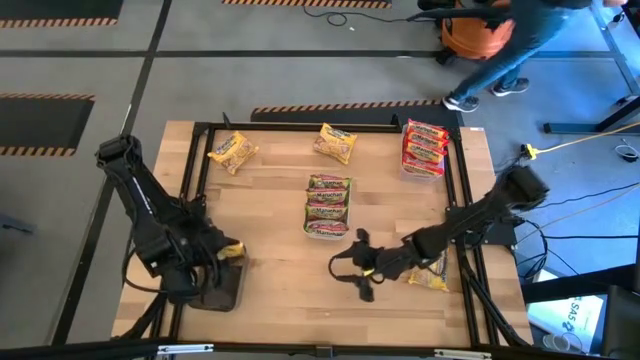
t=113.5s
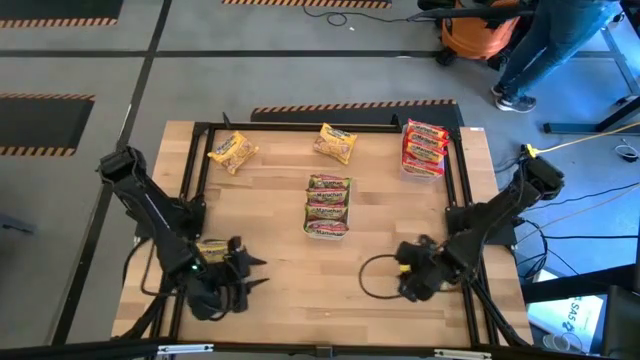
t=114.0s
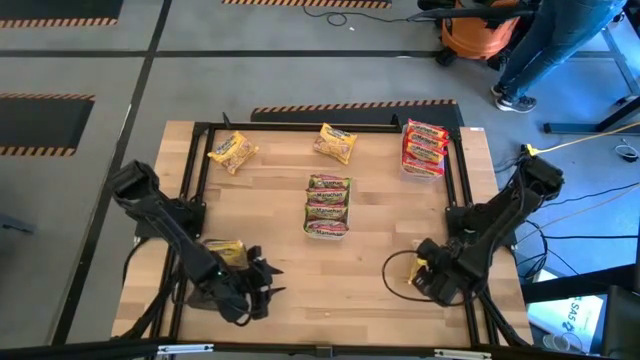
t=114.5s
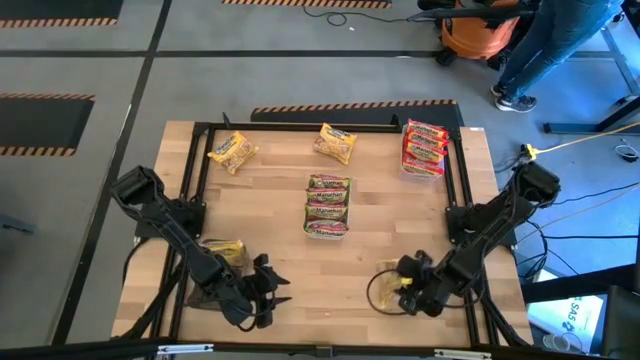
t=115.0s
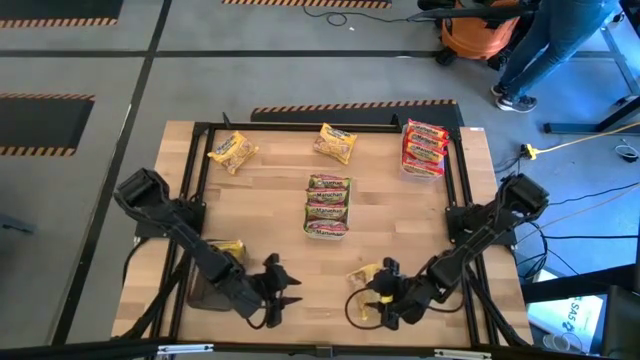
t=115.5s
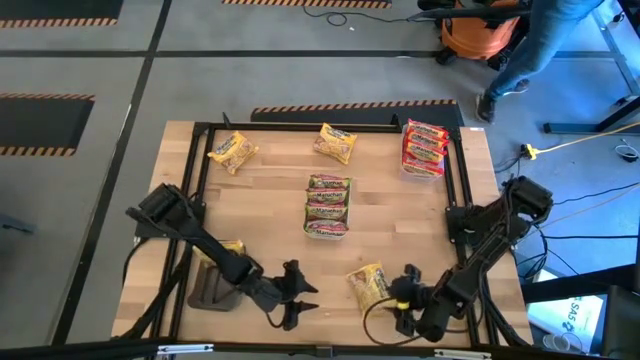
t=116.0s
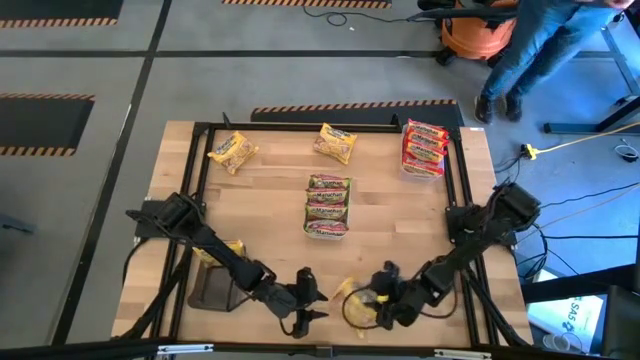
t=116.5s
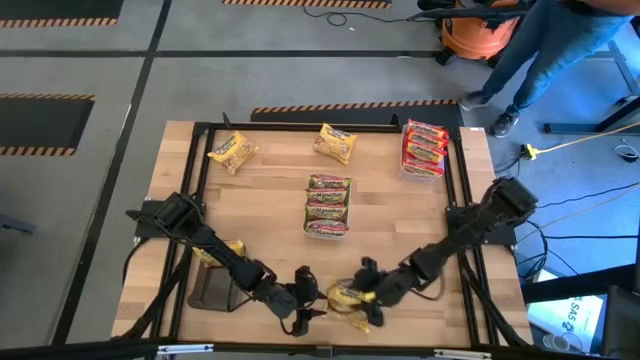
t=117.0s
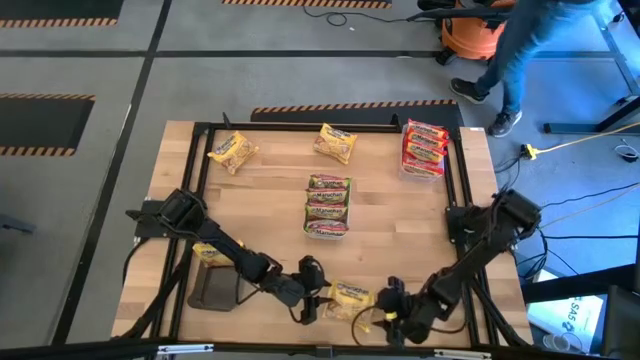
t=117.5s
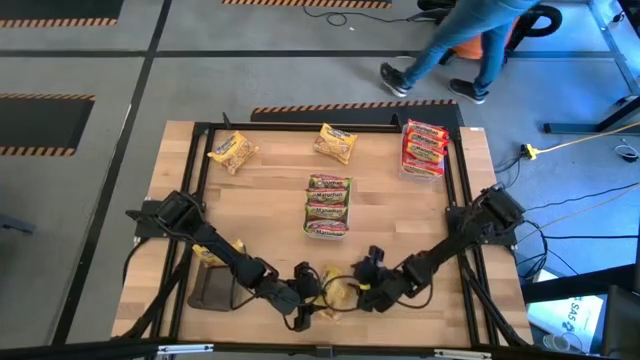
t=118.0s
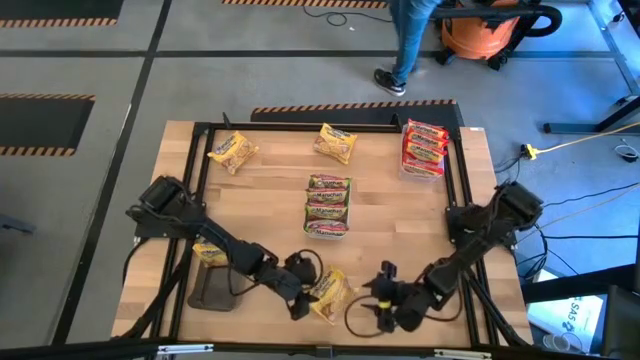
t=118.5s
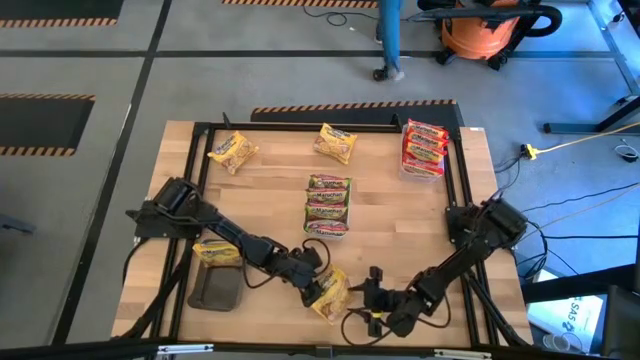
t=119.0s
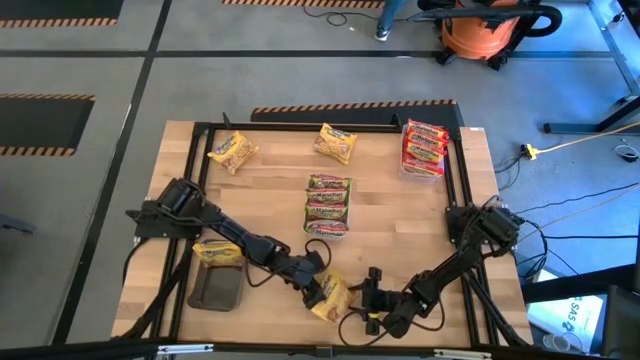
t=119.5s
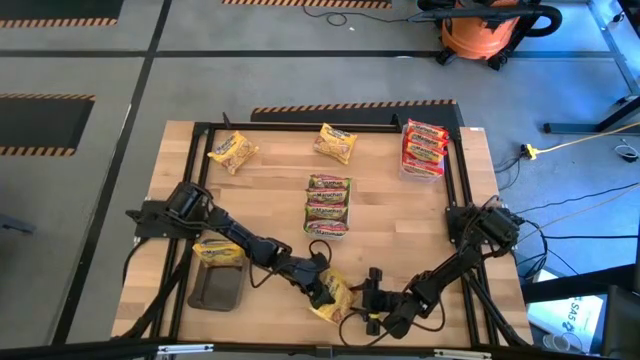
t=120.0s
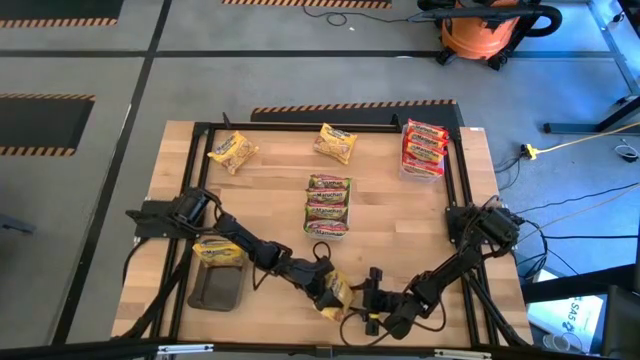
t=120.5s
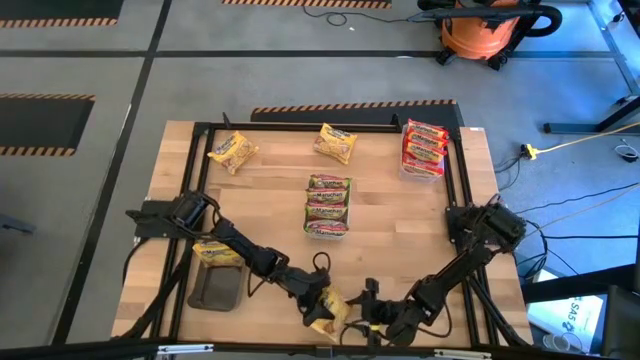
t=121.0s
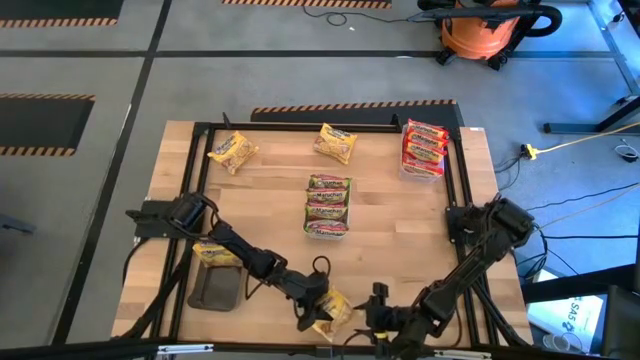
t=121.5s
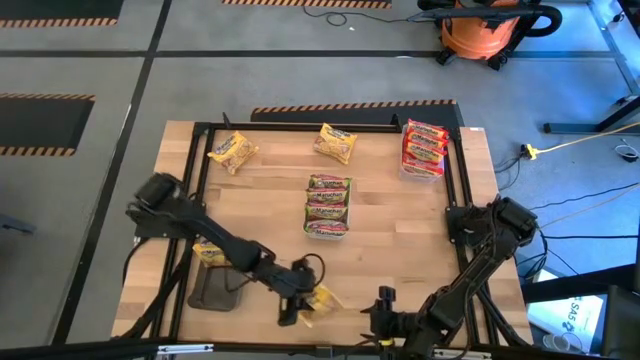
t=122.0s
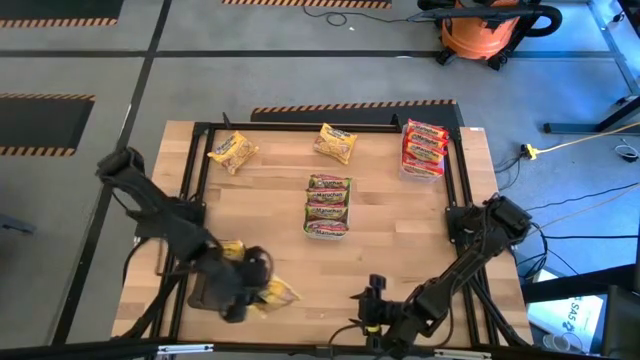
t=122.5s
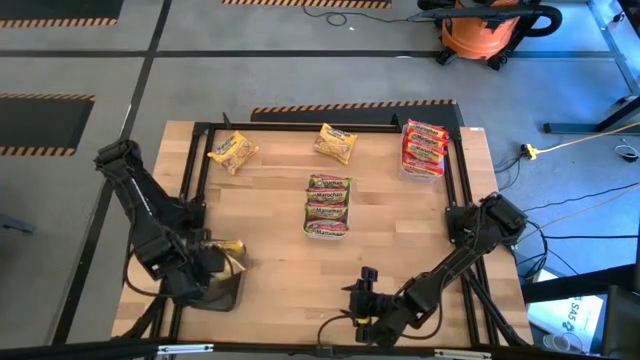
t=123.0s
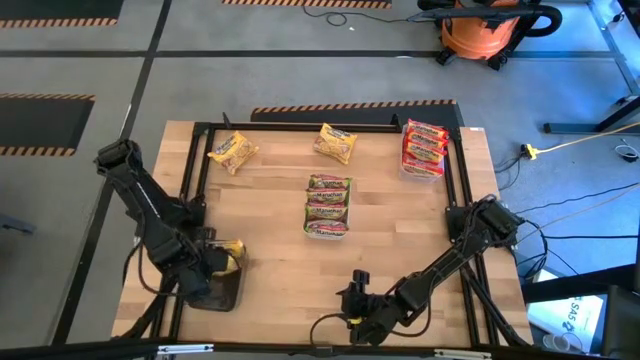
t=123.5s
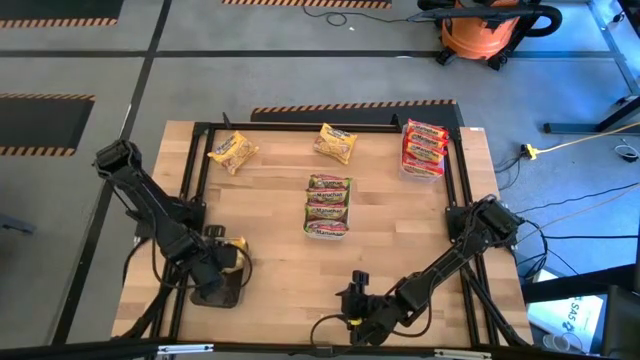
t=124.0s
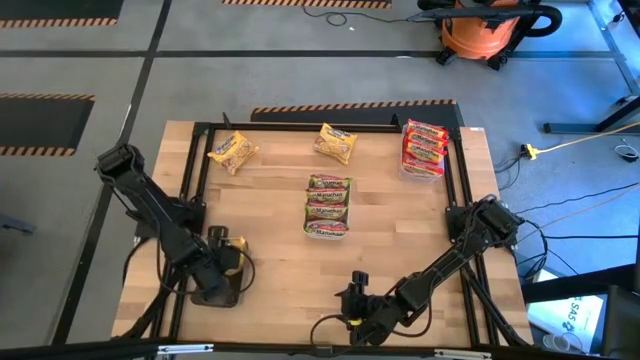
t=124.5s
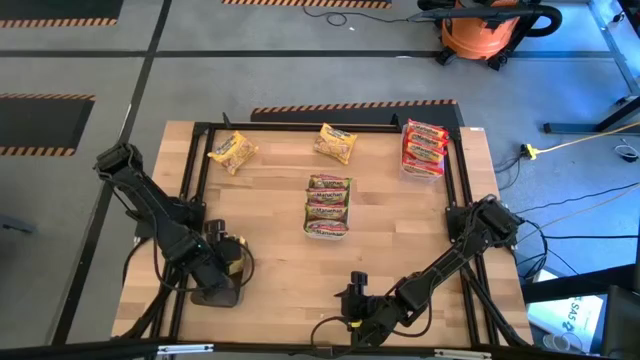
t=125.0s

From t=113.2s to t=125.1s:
Task: Sort Maruchan noodles
Put the yellow noodle pack into the black bin

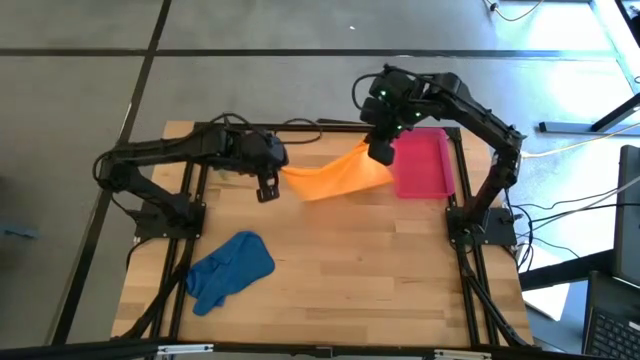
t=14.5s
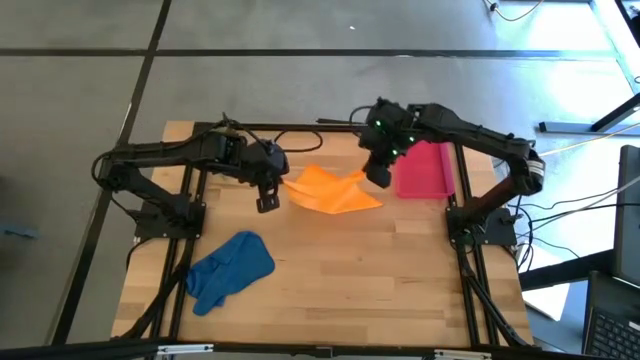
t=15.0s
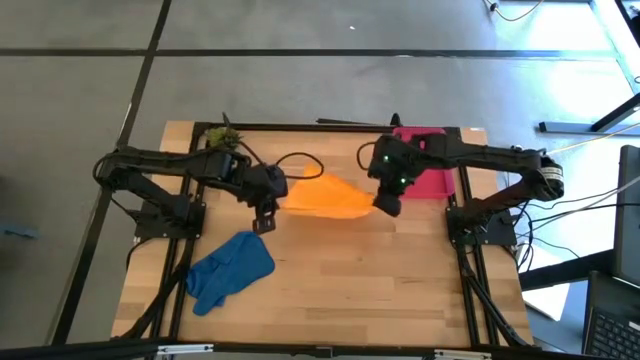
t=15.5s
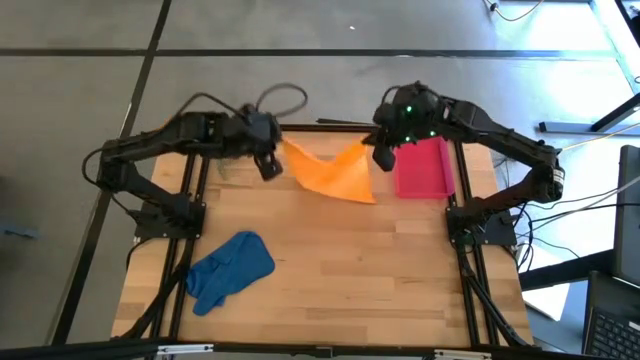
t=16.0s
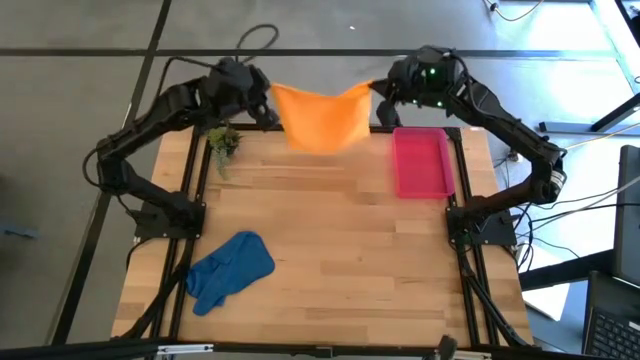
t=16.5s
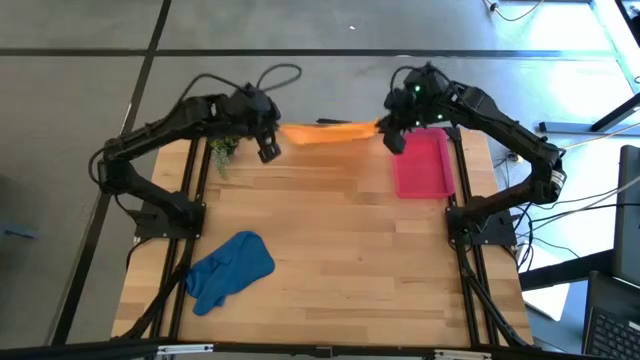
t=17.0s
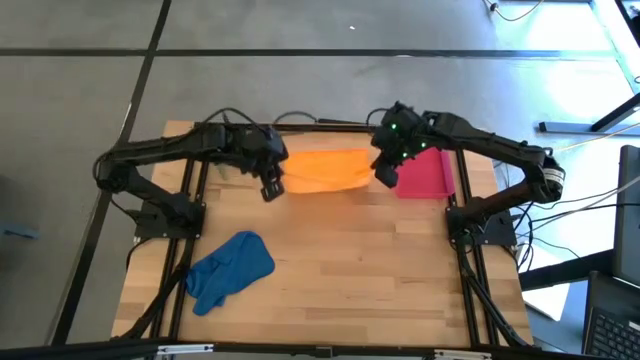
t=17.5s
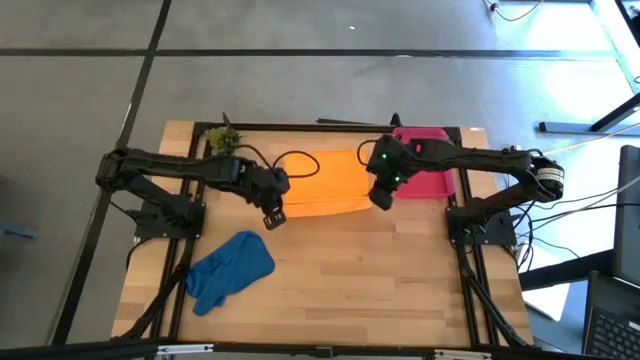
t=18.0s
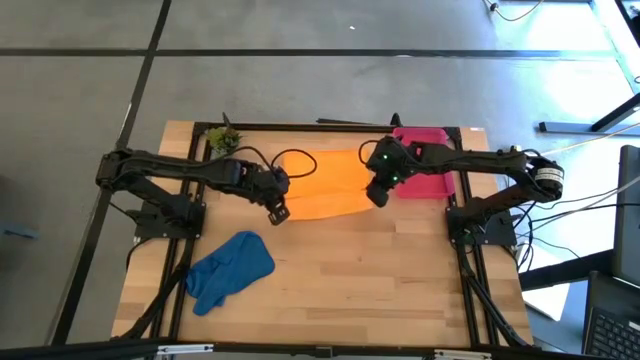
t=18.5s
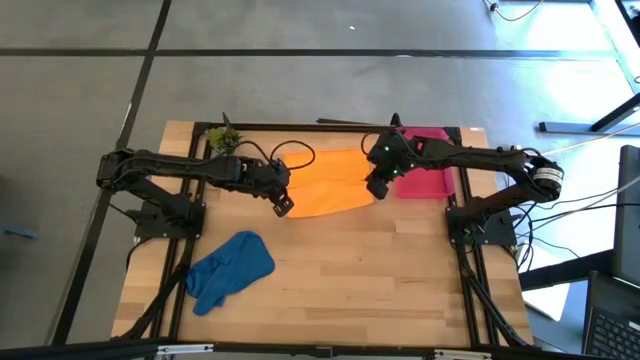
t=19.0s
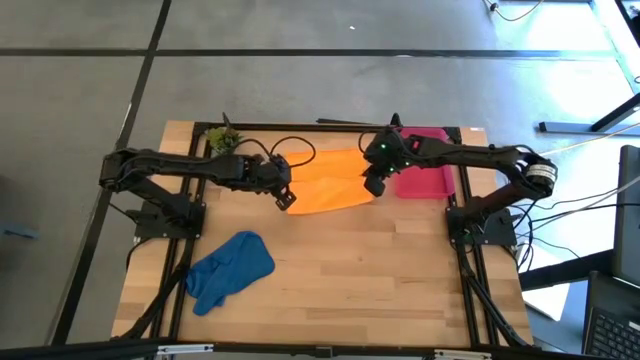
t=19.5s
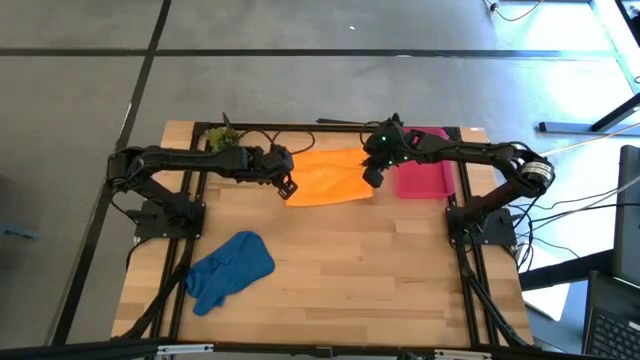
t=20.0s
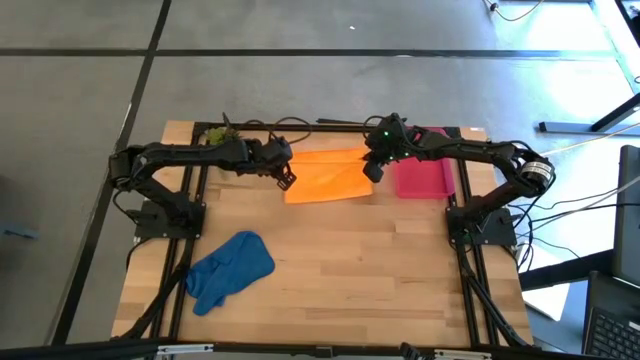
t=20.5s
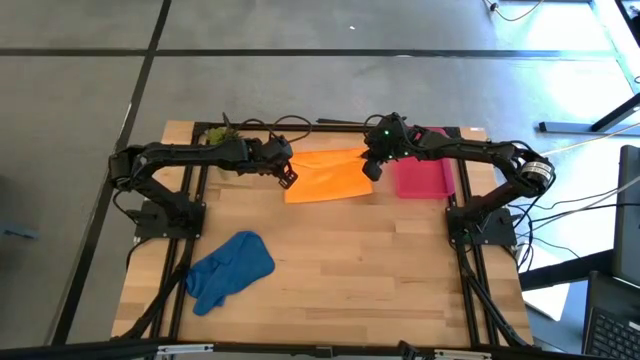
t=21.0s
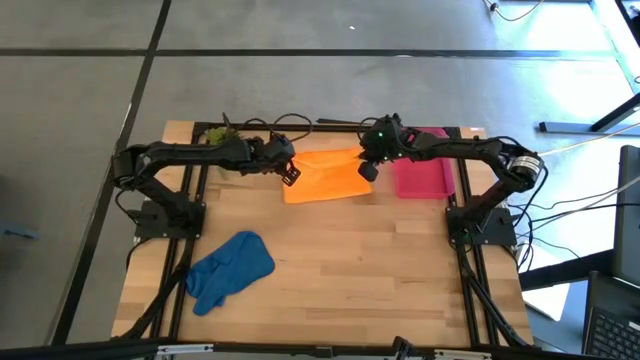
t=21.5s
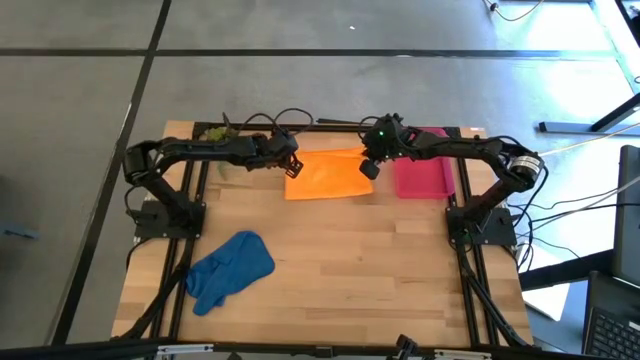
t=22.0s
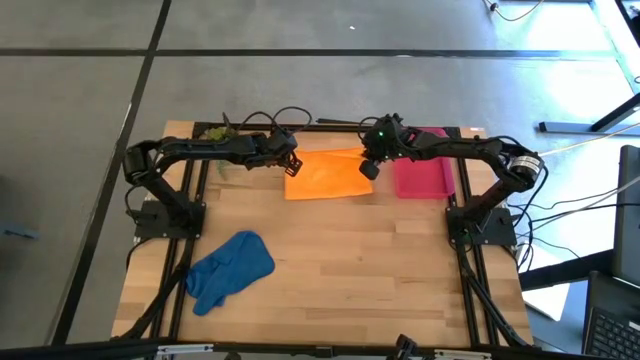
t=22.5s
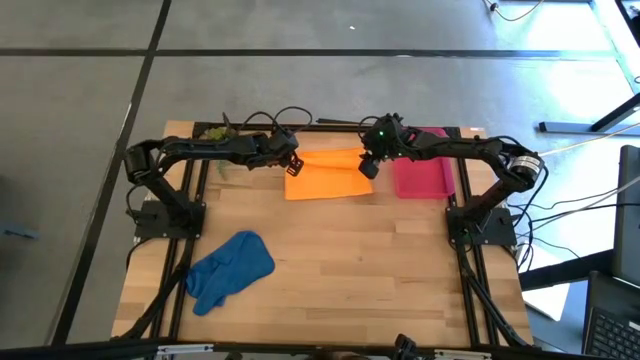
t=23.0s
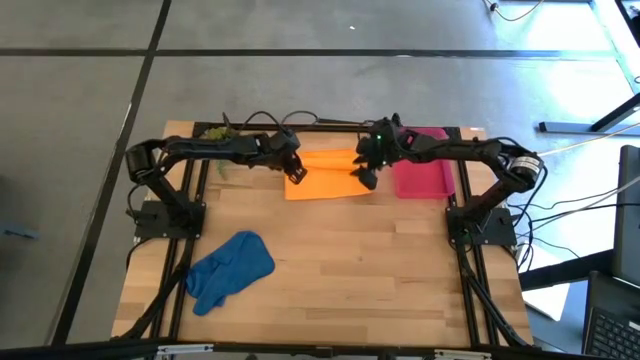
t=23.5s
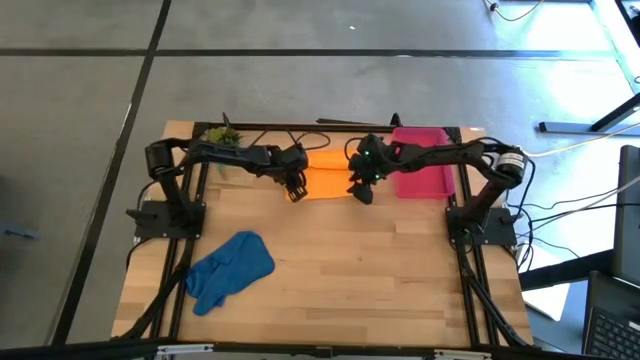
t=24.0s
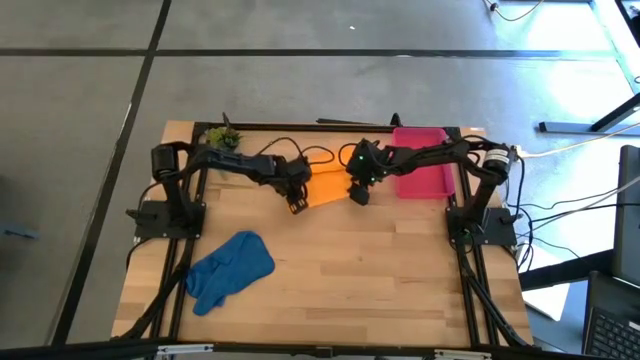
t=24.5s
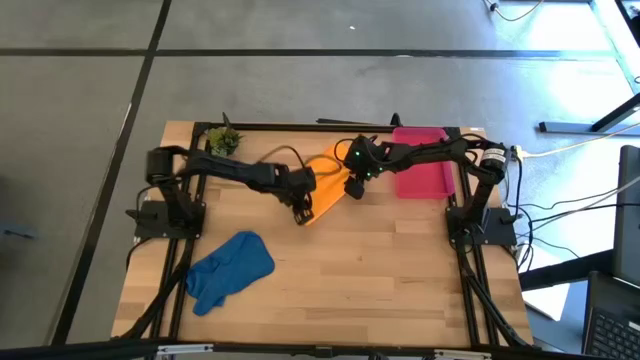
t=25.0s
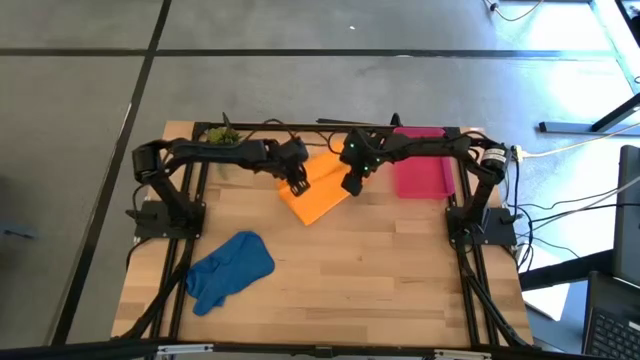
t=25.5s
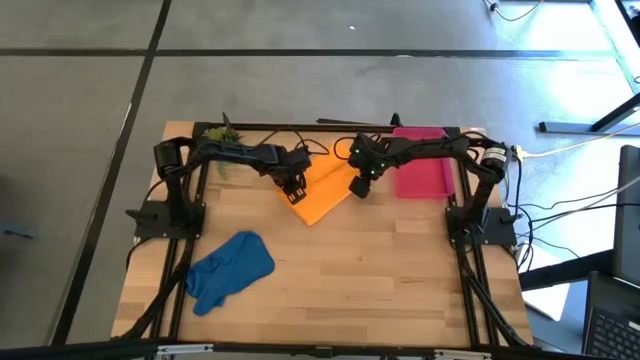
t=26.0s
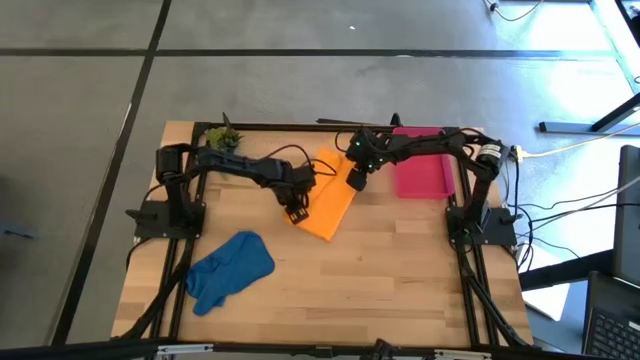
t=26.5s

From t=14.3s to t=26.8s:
Task: Roll microfiber towels into tight, uniform cylinder then place into a basket
Fold the orange microfiber towel
